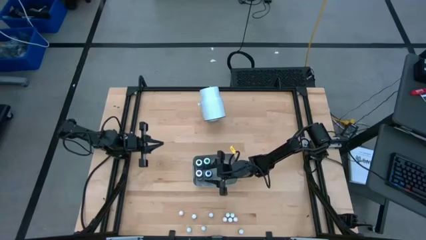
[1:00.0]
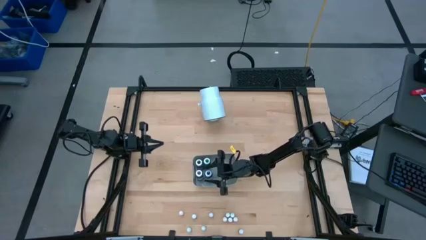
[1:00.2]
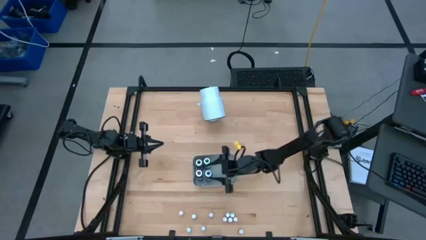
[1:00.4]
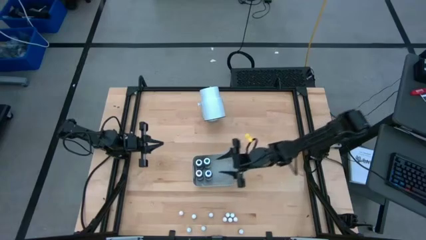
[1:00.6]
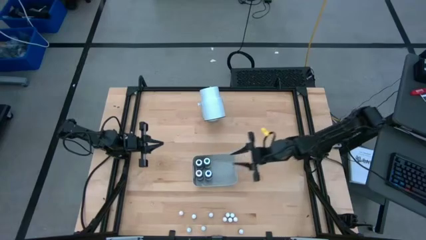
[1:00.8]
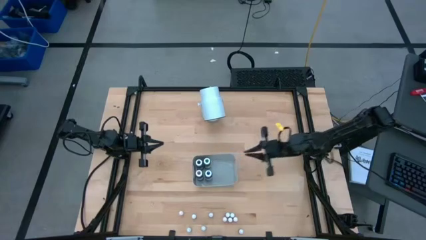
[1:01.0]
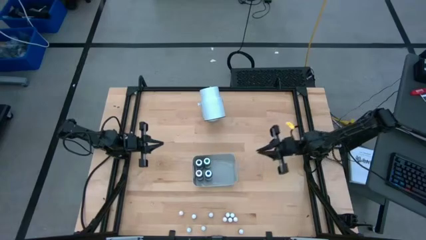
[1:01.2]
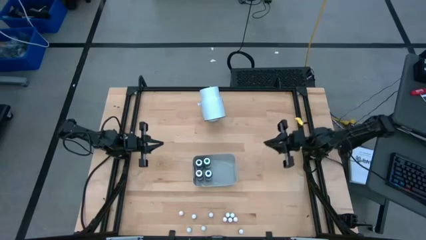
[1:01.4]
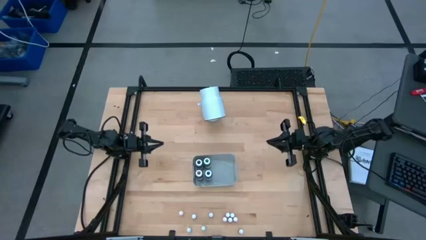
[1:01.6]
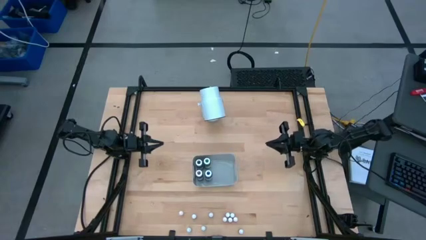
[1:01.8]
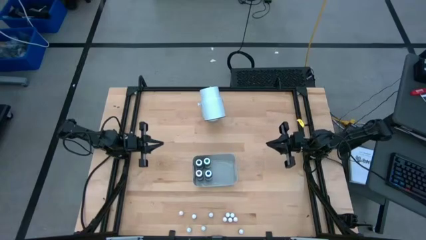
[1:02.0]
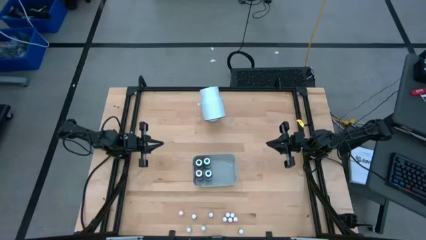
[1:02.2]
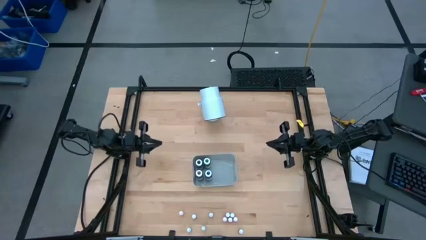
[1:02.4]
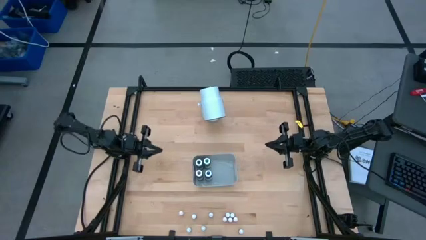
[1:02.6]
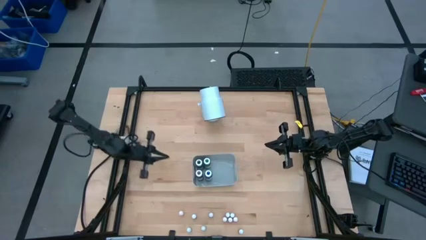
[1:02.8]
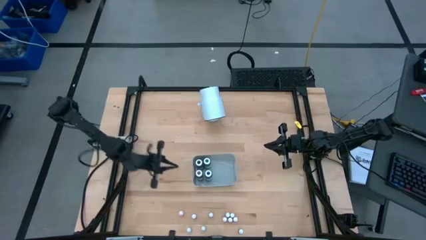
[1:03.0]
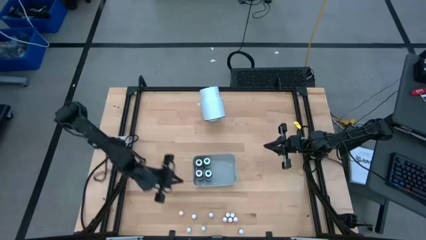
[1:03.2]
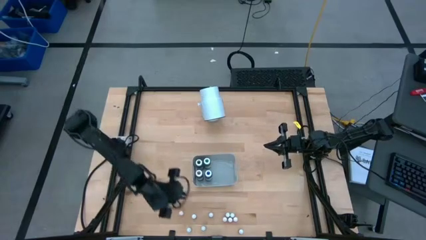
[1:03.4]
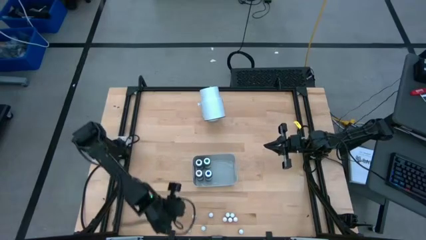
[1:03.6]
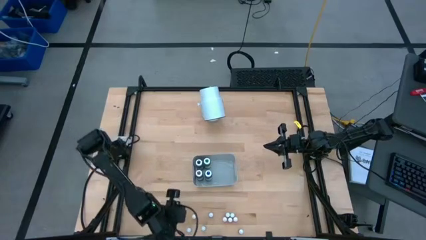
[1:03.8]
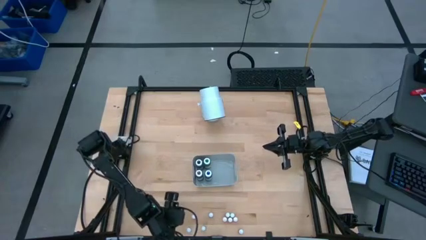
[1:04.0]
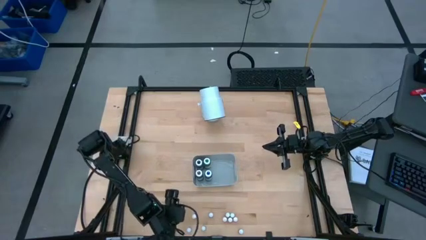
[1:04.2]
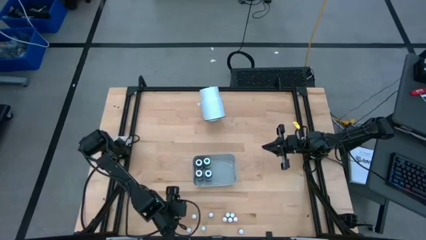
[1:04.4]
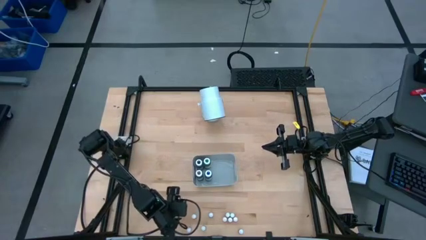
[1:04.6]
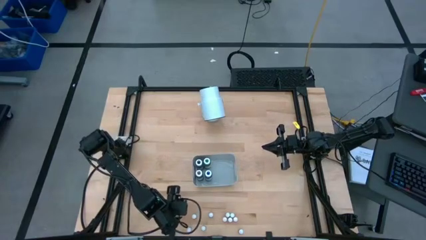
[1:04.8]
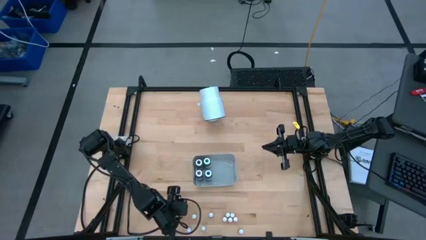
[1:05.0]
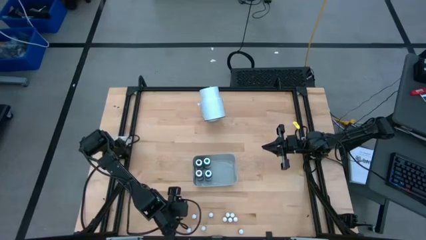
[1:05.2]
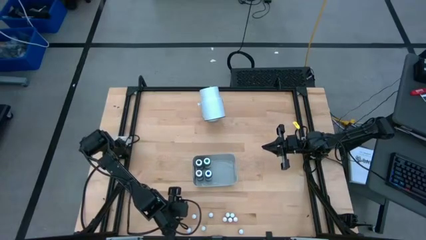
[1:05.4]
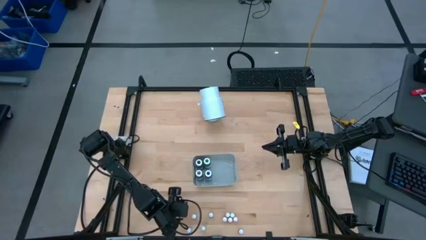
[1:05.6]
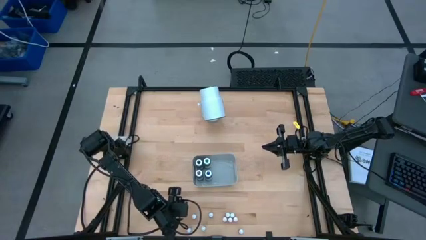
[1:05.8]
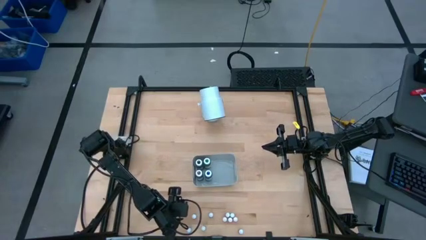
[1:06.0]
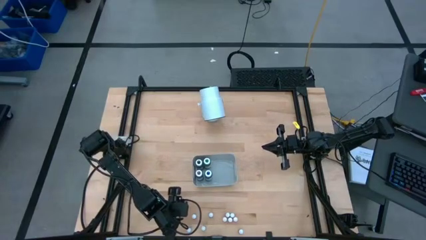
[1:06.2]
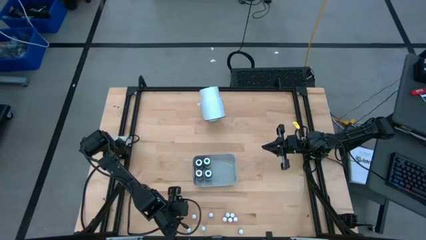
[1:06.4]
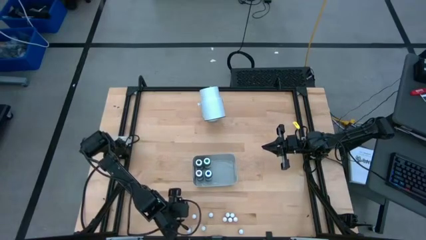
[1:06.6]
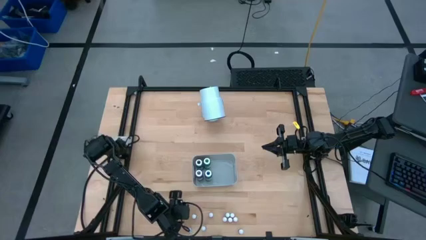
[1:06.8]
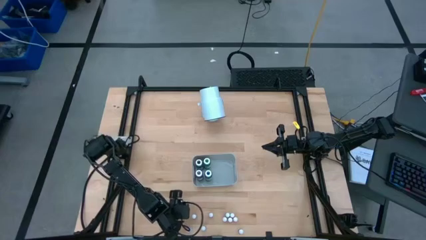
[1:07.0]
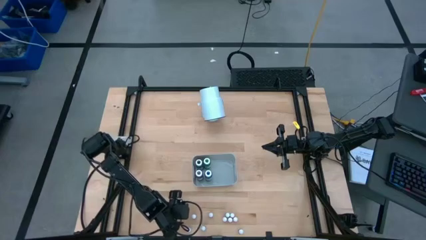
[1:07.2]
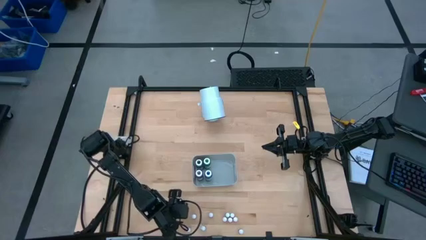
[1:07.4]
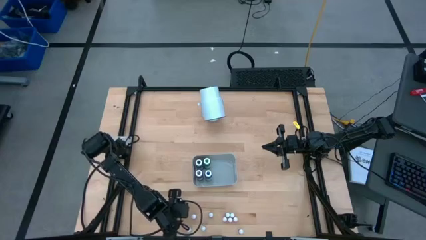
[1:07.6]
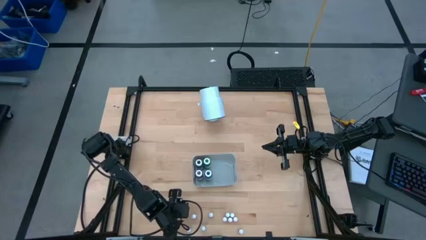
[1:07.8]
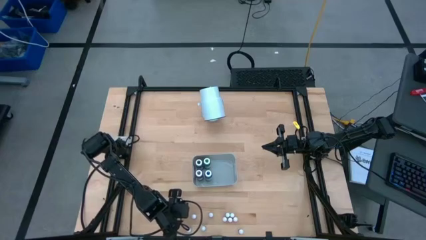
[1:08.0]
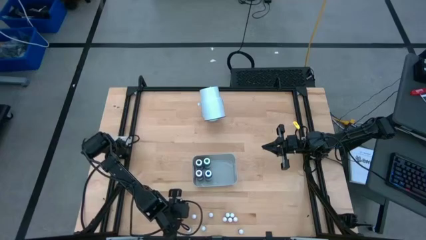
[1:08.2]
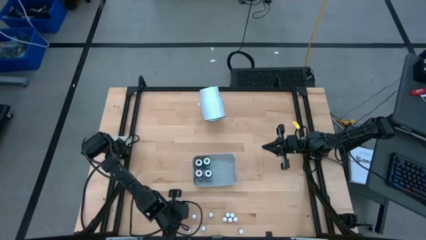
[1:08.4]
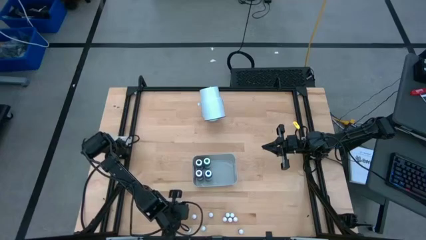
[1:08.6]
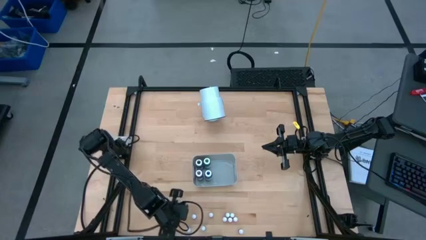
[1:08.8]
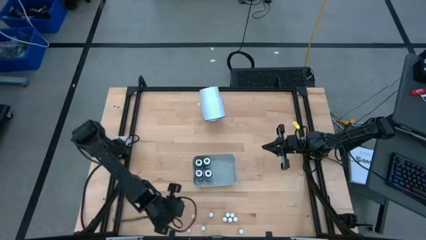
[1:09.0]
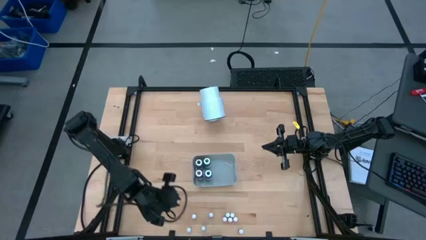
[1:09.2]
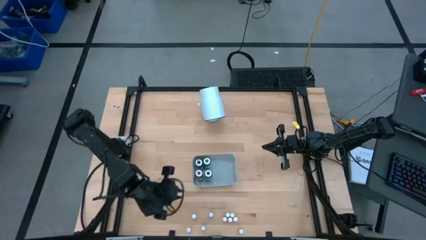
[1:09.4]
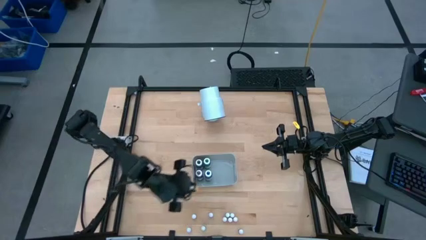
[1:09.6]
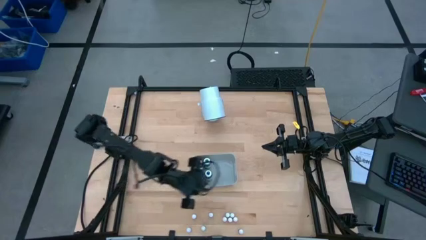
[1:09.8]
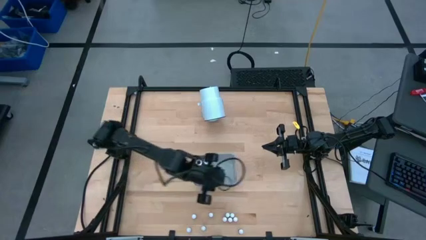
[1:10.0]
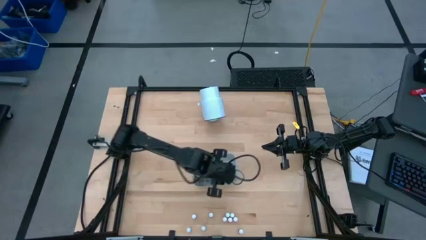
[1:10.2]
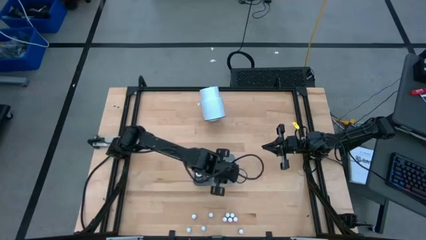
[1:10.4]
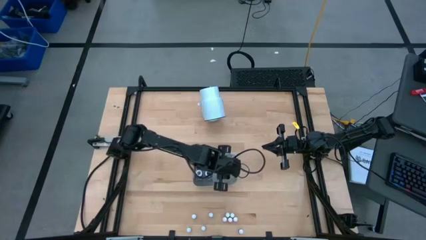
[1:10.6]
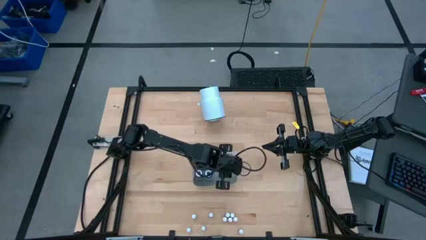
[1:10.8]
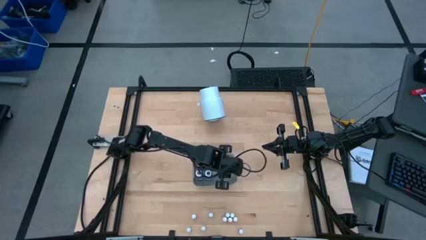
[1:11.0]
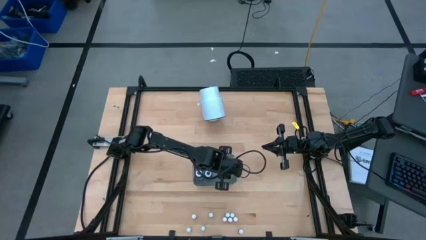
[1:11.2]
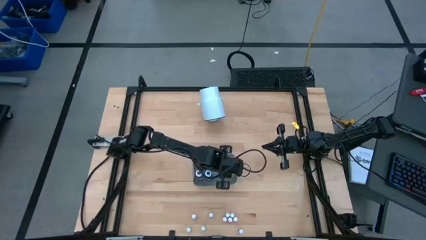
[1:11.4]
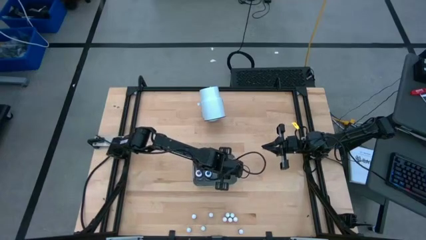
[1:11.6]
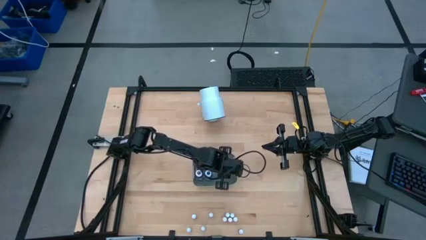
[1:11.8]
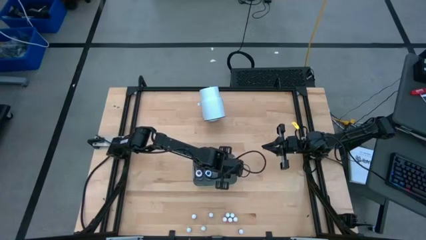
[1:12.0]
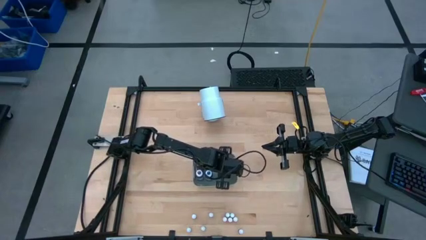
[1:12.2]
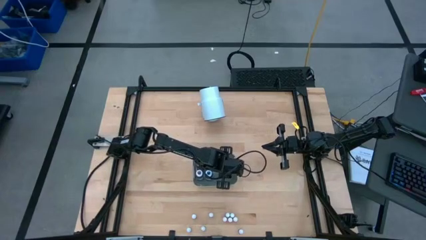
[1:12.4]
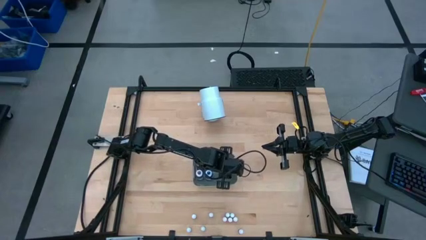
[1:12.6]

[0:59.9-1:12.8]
Task: Pick & Place food coloring
Put the small yellow food coloring into the gray bin

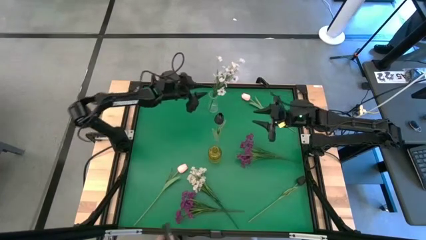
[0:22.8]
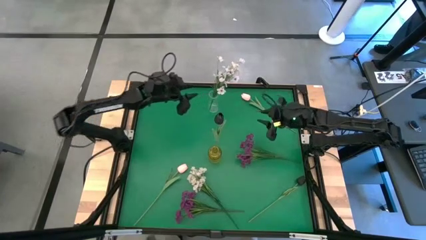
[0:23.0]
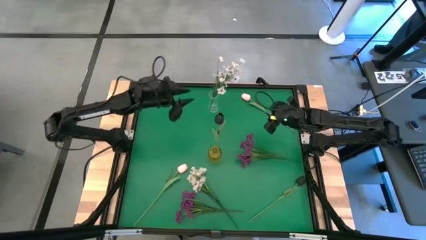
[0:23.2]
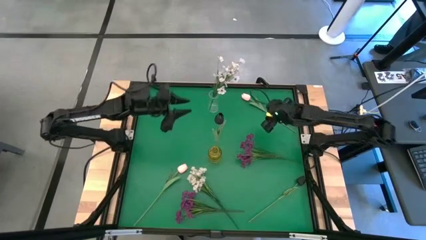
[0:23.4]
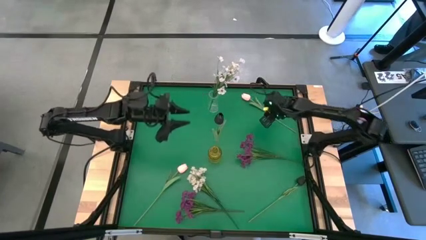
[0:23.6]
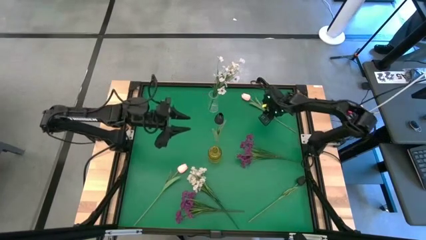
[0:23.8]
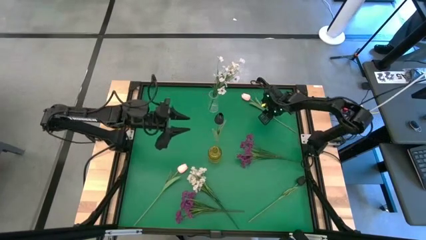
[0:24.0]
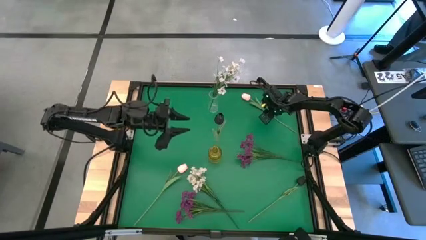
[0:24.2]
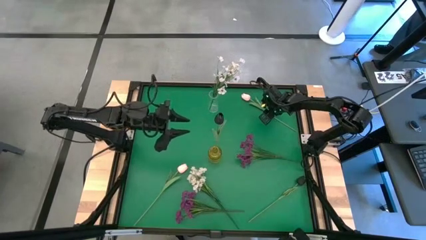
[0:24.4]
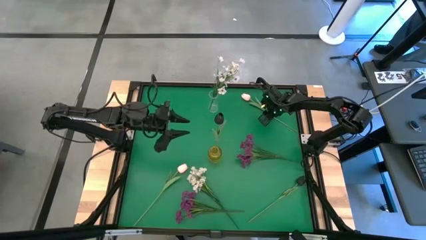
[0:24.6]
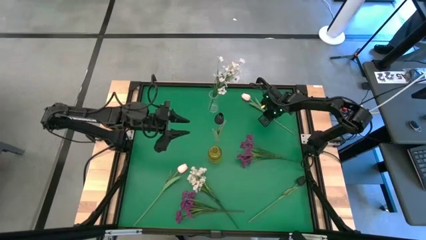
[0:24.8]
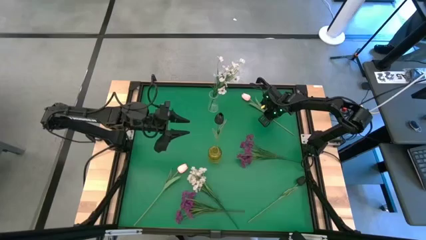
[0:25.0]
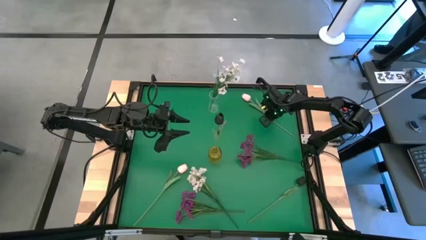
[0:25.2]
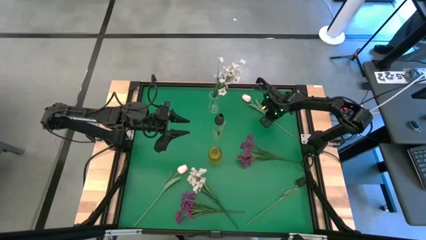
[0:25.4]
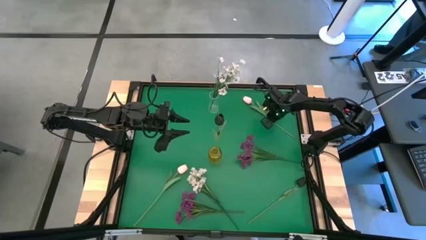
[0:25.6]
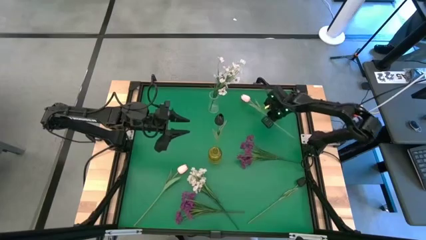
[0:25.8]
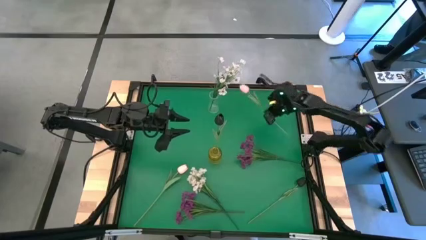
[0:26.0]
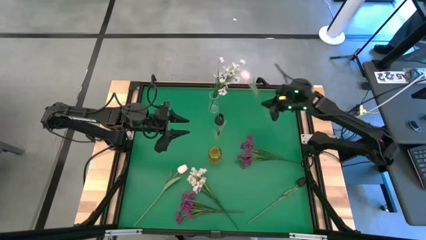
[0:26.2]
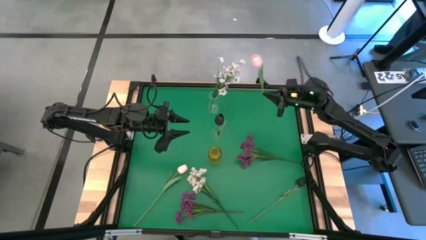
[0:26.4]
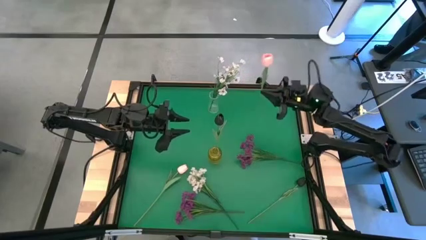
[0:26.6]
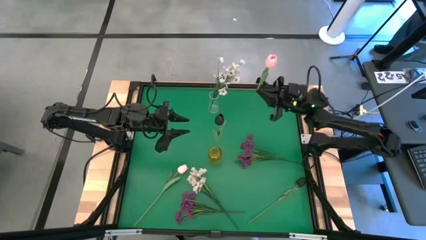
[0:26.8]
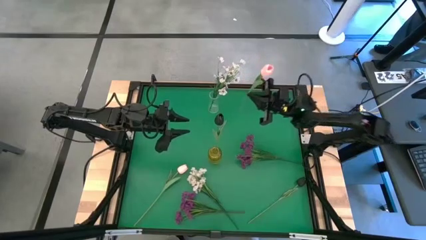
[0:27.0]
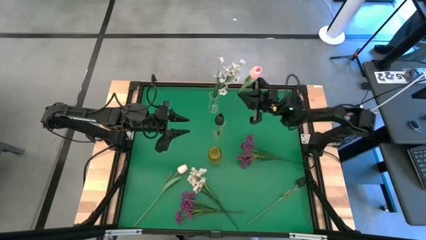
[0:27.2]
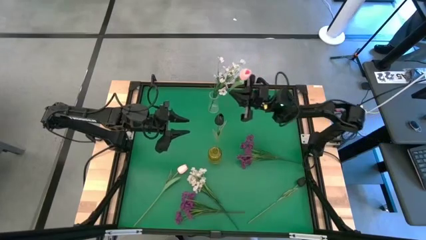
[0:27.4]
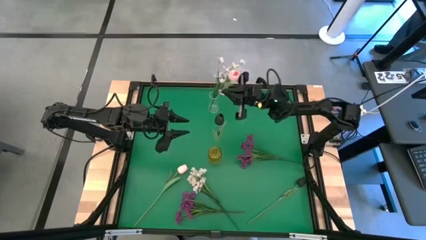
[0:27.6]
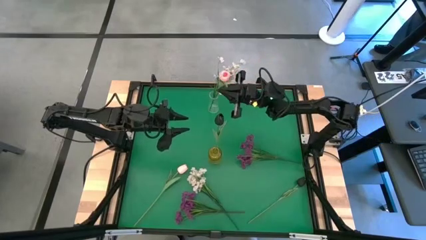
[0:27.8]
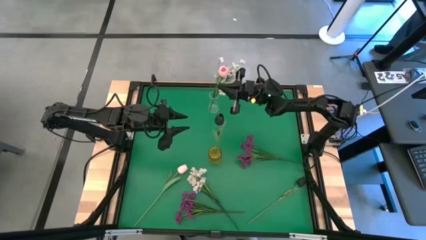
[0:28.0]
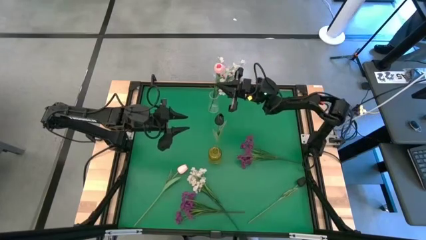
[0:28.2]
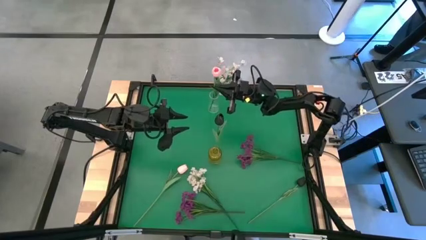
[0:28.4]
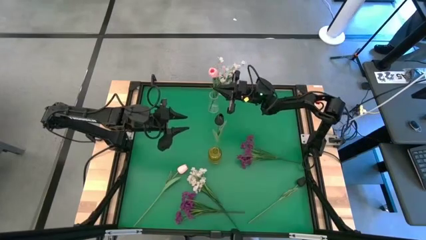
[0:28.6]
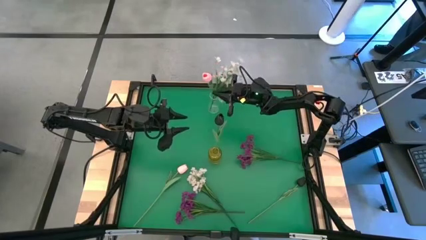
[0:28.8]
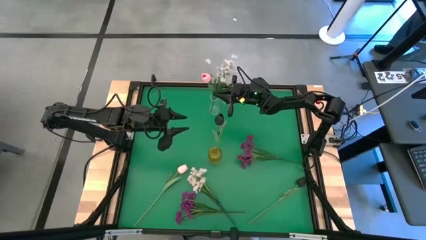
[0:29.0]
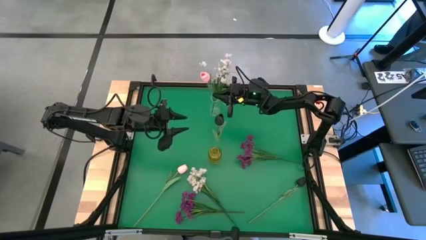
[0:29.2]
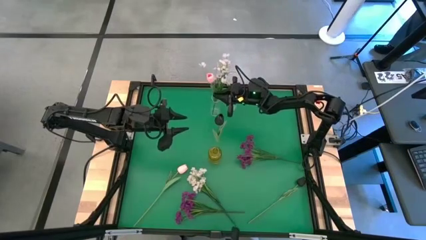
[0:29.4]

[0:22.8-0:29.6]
Task: Sort flowers into vase by color
Put the top pink flower into the transparent vase
